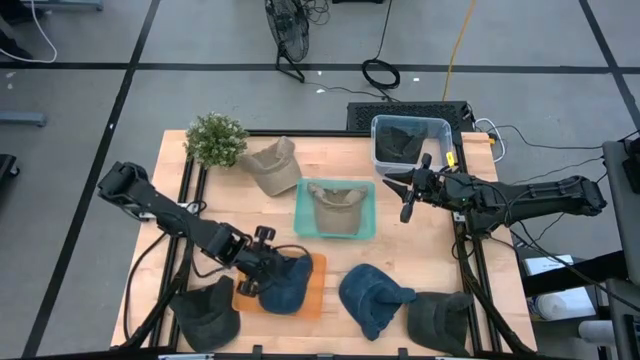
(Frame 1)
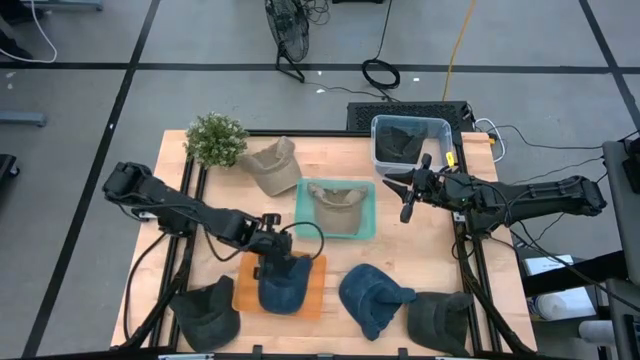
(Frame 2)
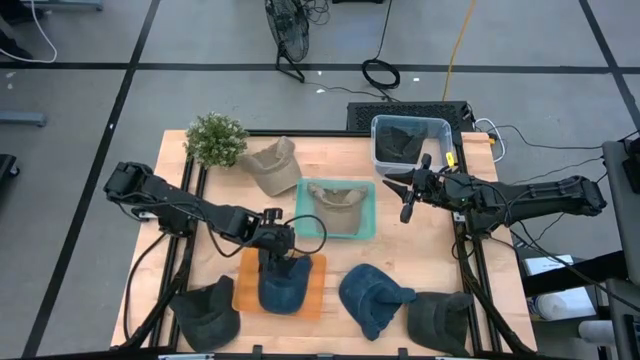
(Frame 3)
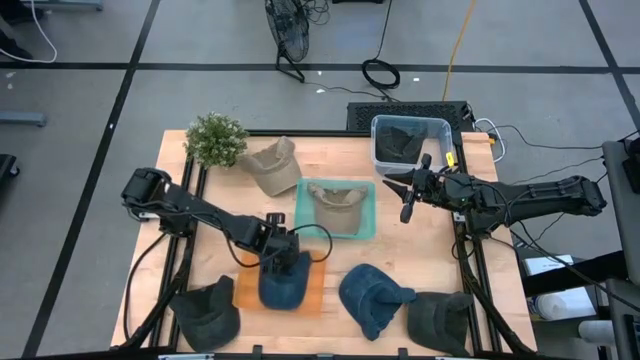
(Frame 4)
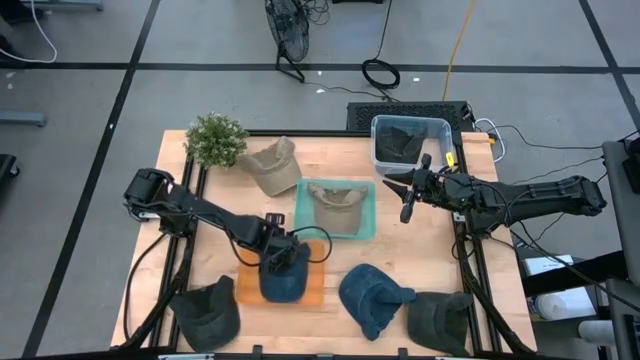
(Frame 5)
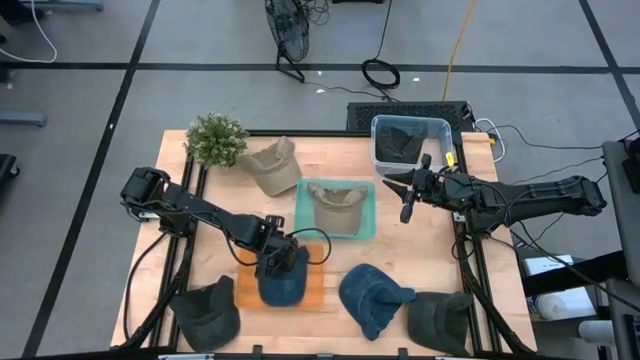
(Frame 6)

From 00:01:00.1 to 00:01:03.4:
Task: Pick & Place hat
Adjust the orange bin

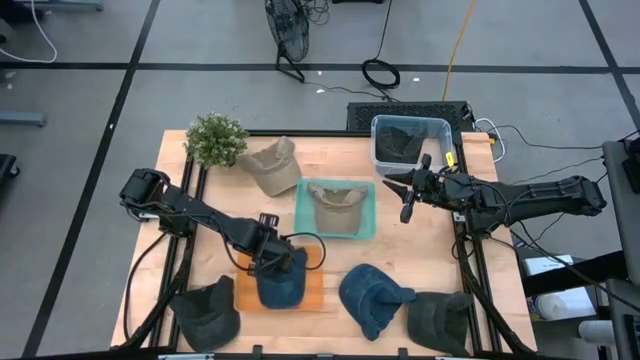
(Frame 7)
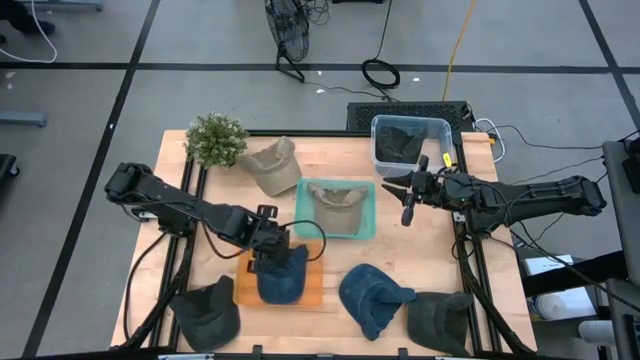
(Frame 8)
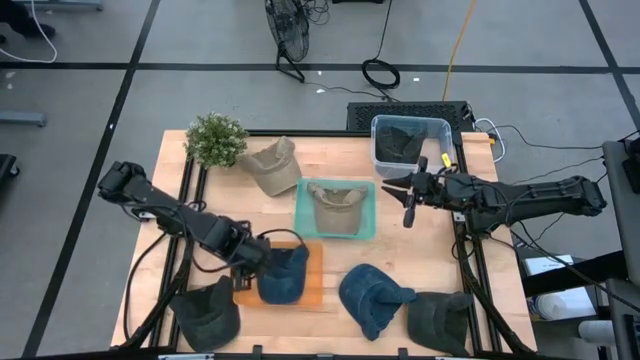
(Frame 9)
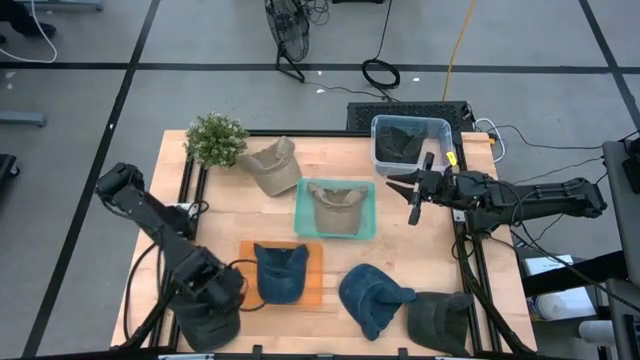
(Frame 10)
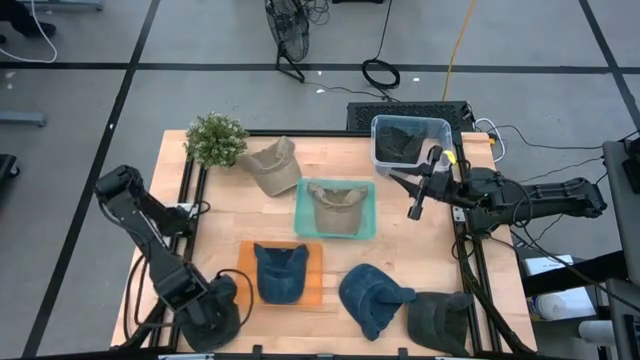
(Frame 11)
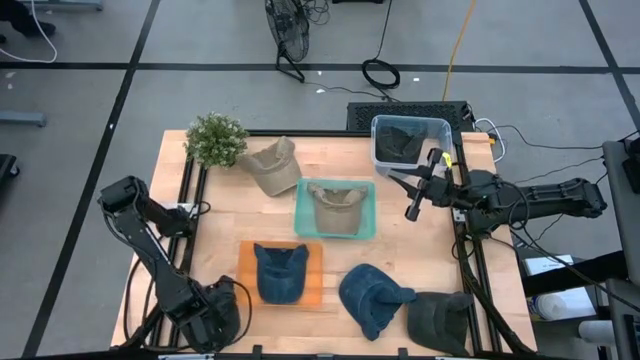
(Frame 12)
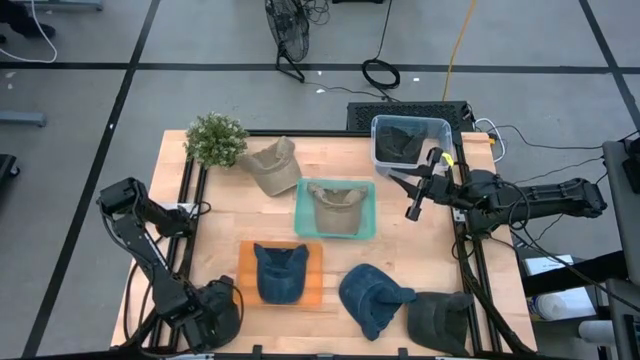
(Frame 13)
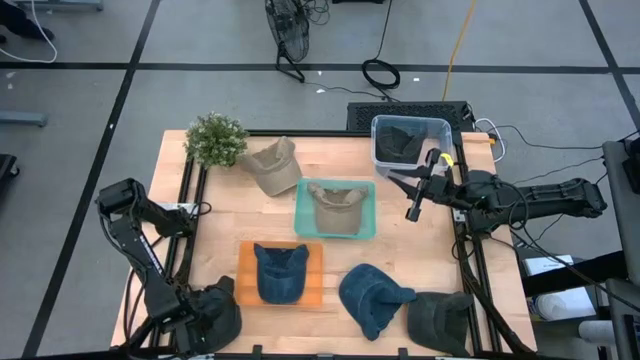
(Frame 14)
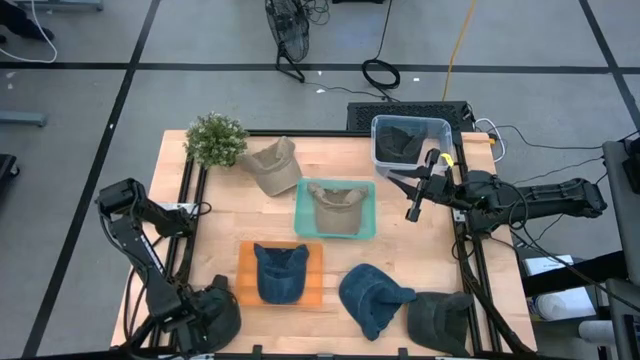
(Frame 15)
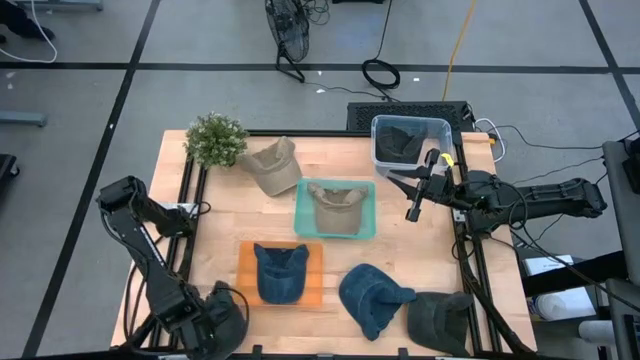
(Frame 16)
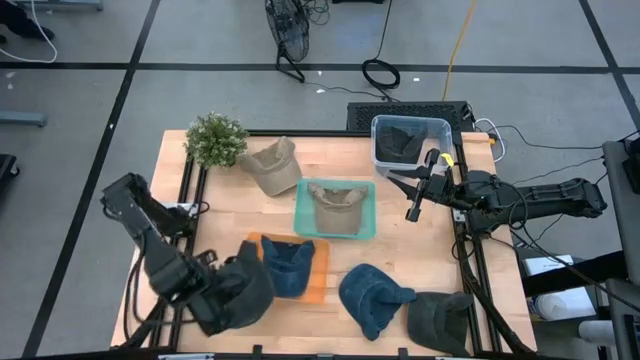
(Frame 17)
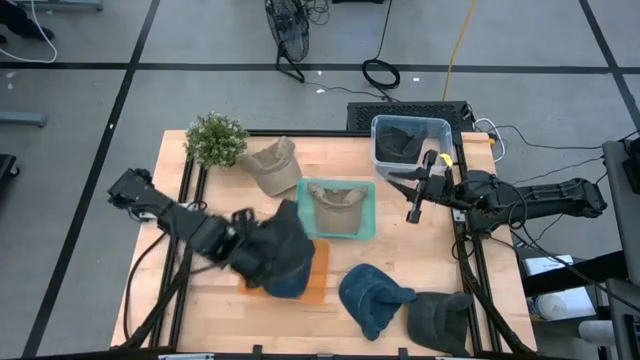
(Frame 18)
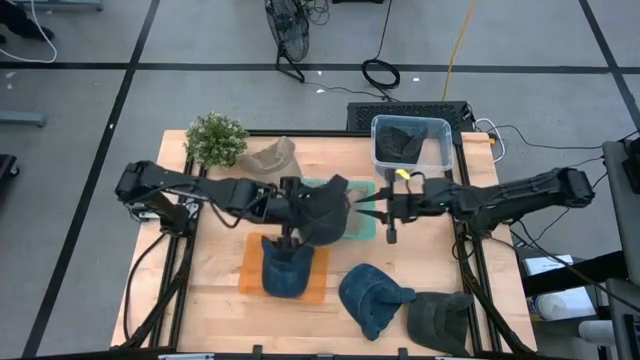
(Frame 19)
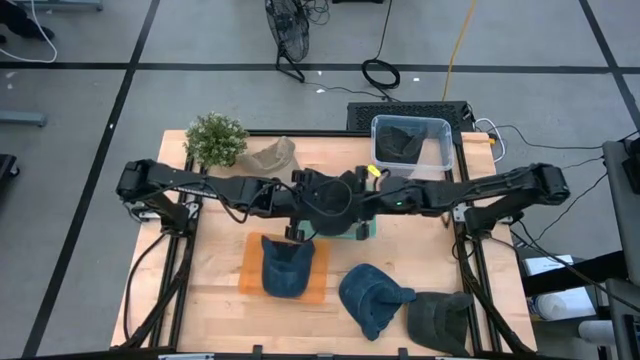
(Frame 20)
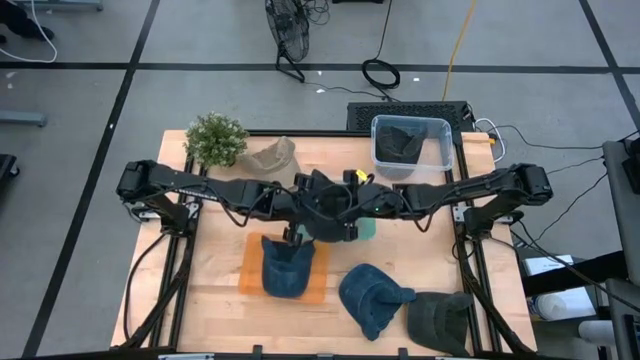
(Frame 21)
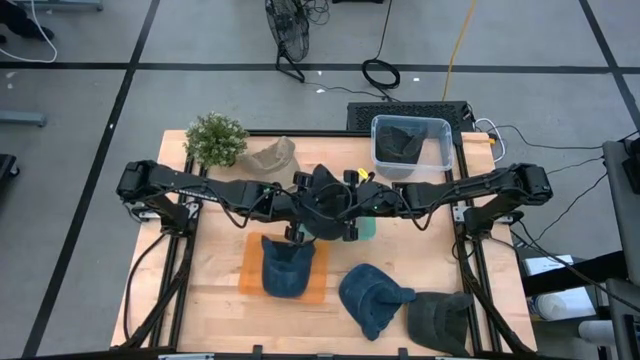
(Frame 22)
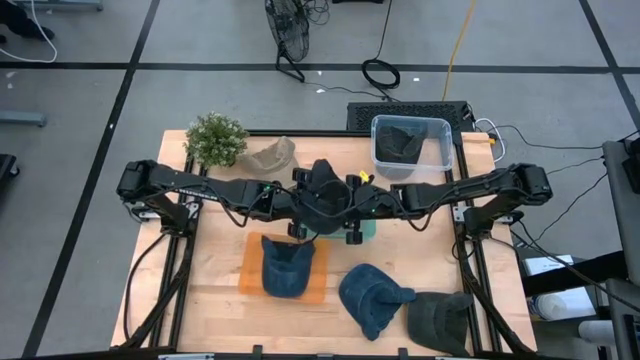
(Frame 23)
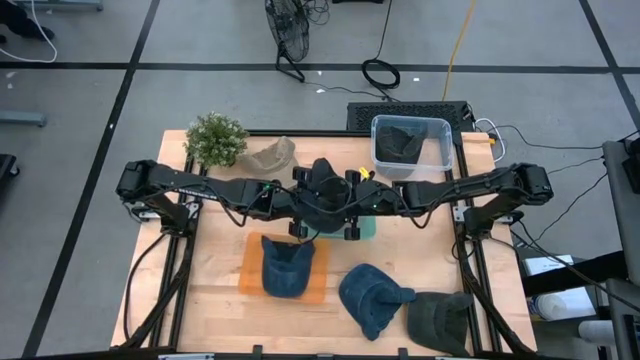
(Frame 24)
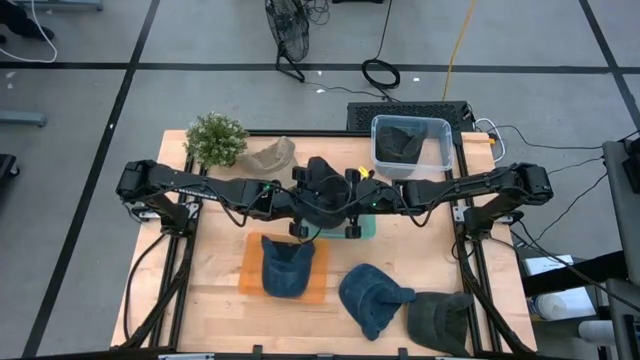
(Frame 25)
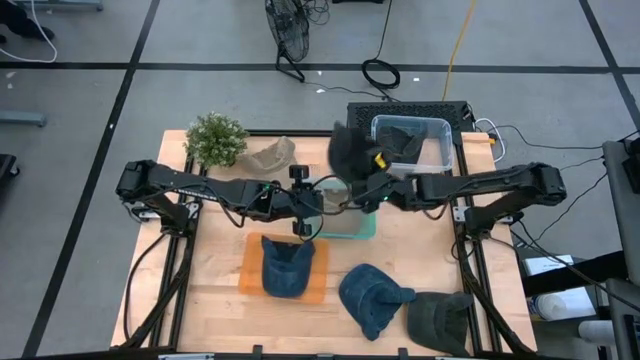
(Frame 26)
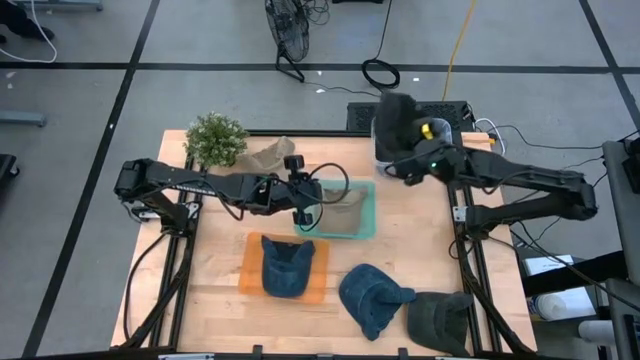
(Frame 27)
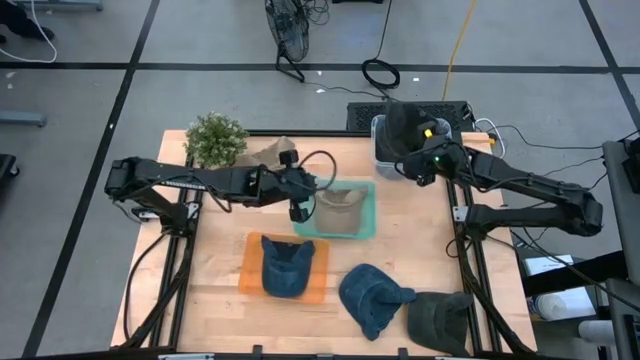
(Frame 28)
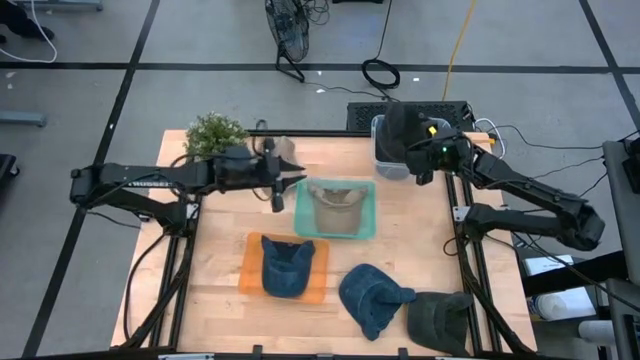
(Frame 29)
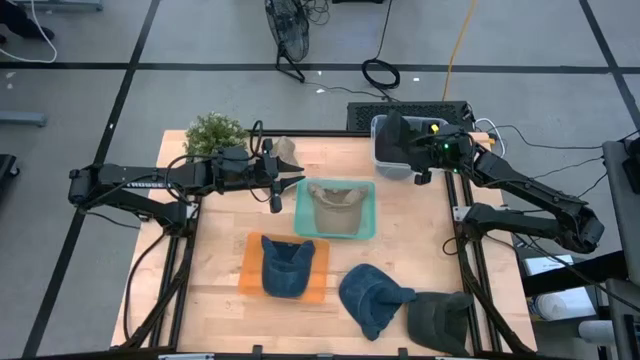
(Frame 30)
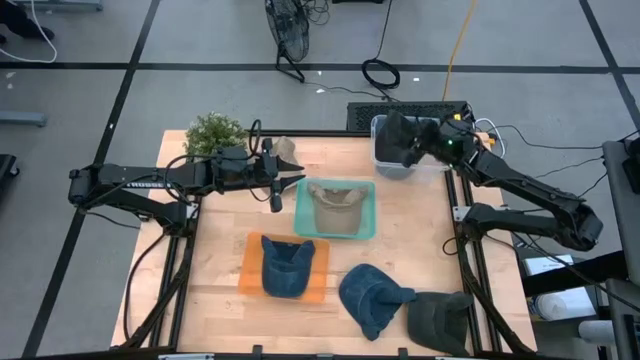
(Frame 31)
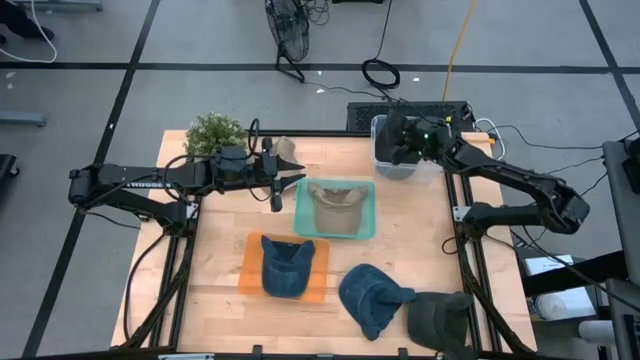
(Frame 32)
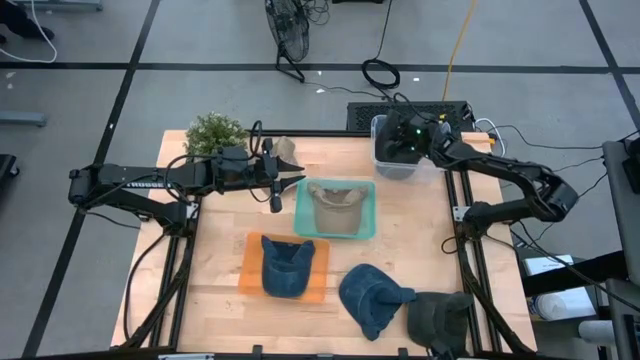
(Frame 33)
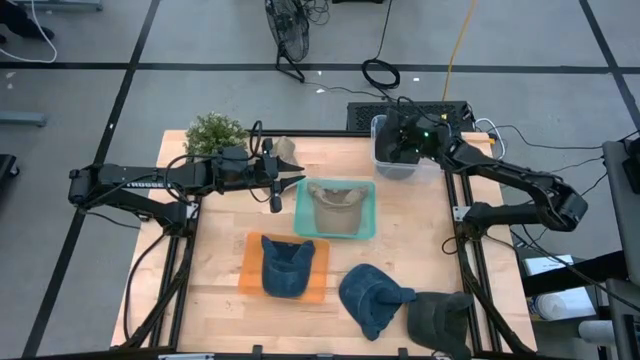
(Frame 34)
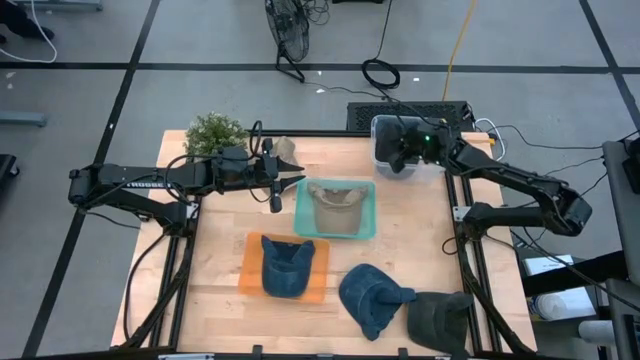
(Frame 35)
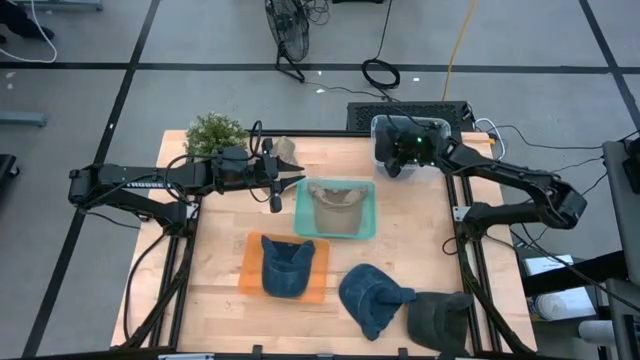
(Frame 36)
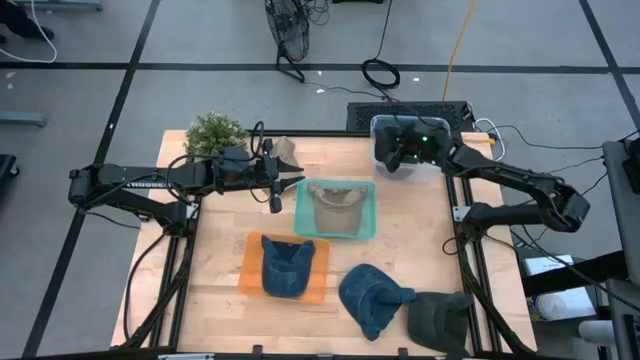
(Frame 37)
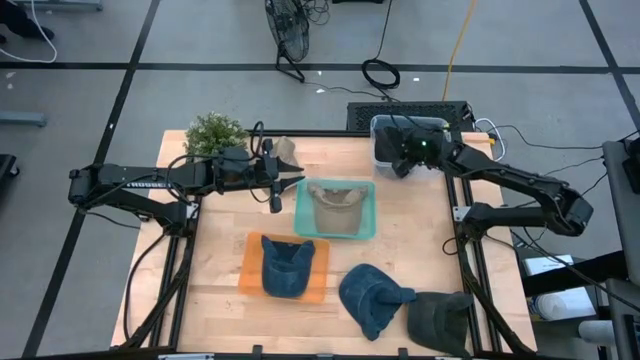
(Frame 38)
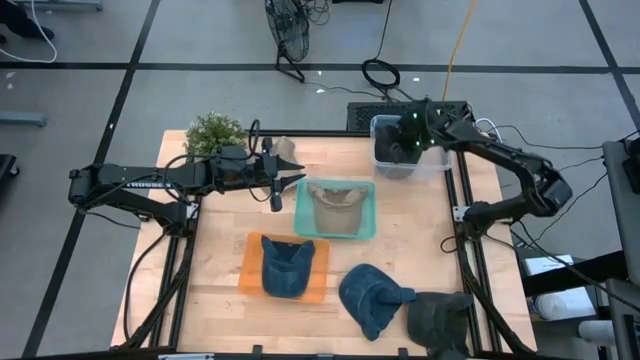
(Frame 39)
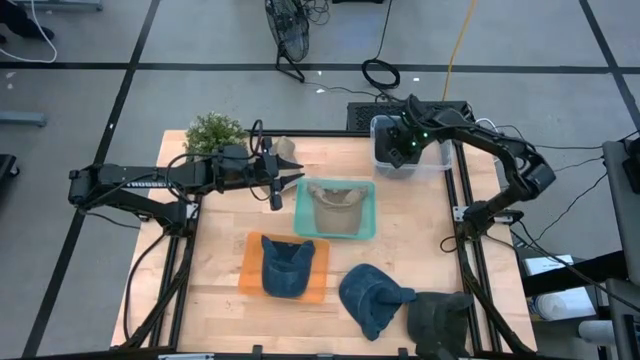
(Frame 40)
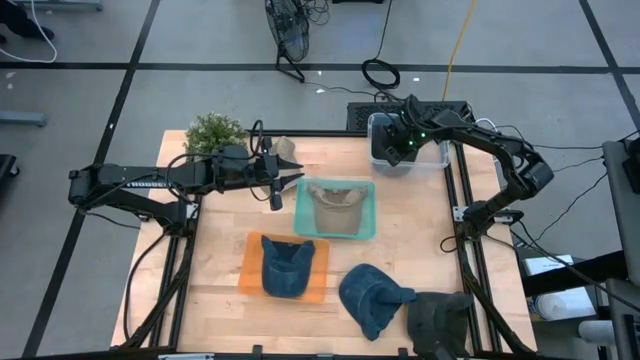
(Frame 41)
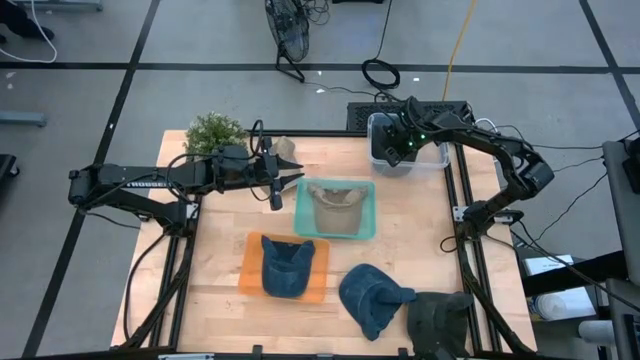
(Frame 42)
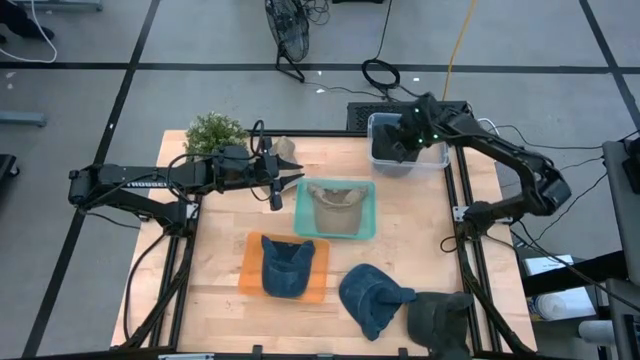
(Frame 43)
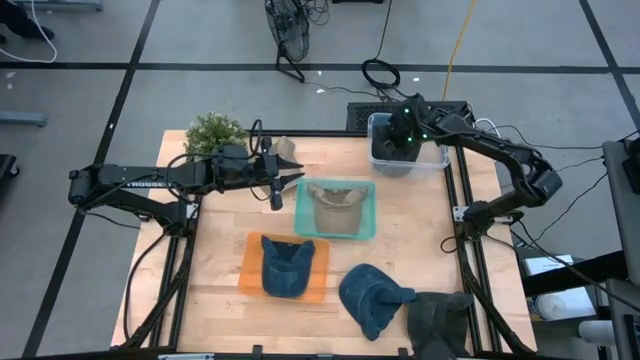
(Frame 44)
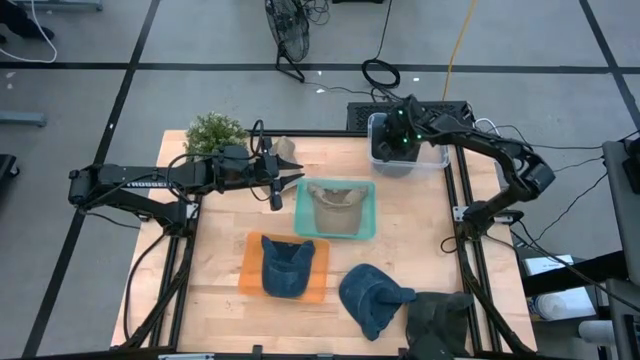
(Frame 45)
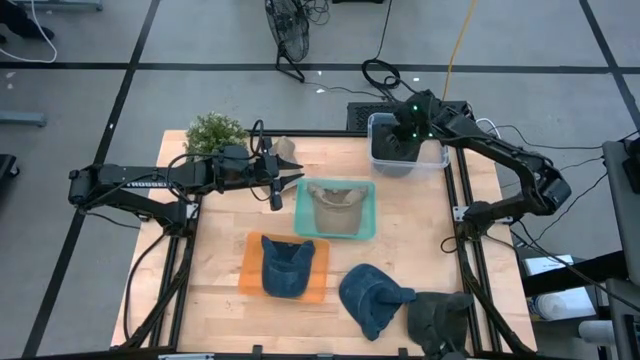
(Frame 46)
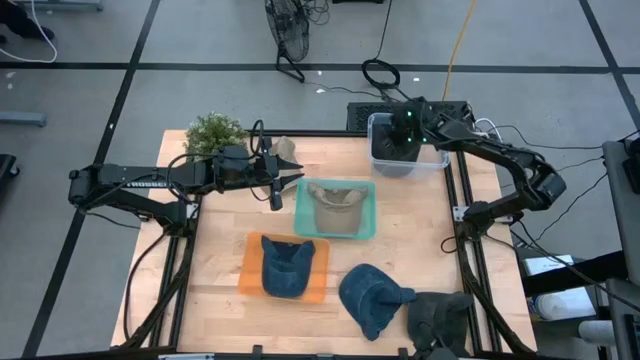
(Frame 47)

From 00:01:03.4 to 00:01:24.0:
Put the left black cap into the transparent bin
